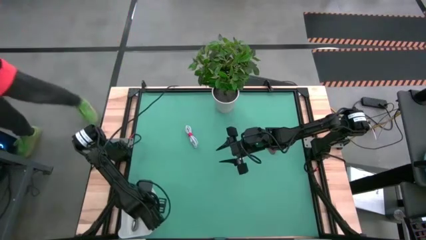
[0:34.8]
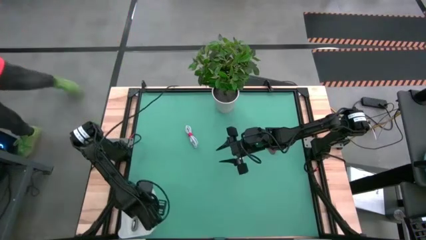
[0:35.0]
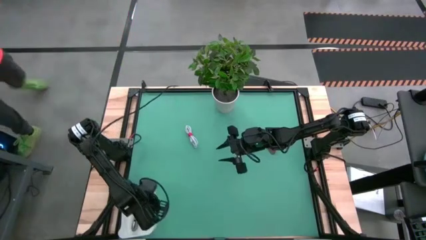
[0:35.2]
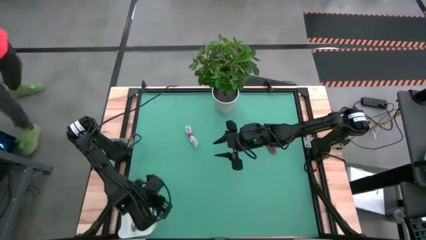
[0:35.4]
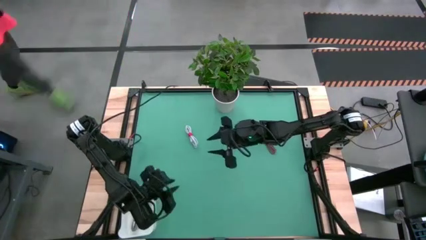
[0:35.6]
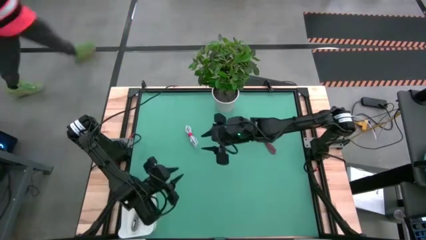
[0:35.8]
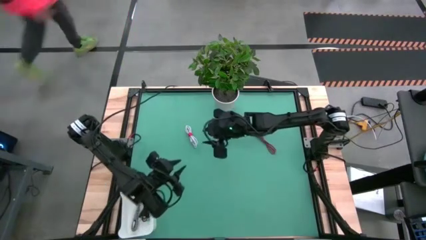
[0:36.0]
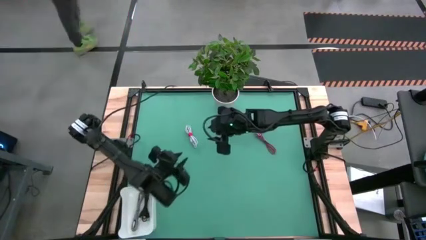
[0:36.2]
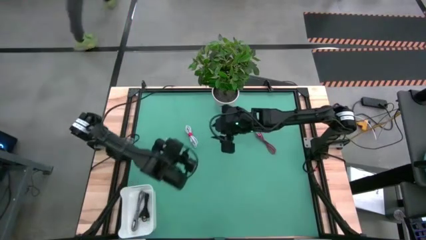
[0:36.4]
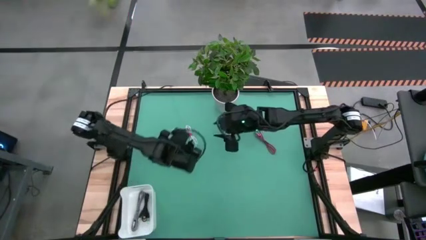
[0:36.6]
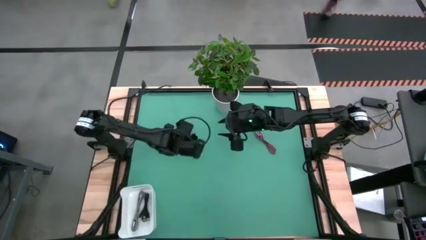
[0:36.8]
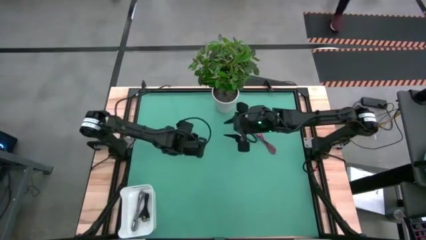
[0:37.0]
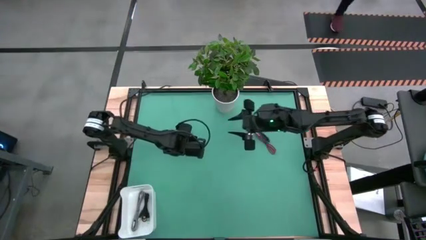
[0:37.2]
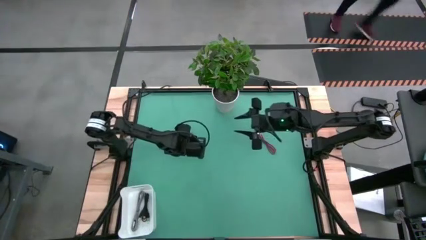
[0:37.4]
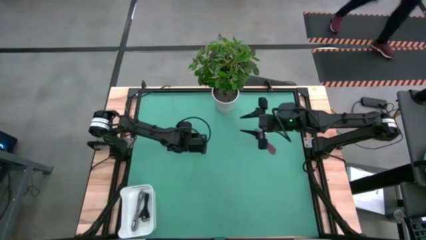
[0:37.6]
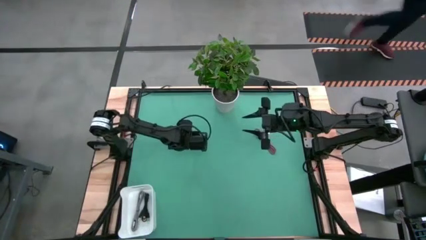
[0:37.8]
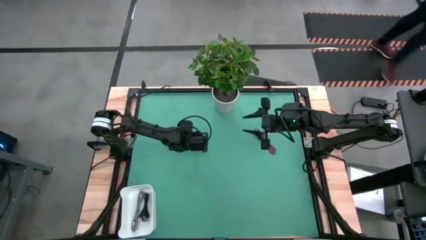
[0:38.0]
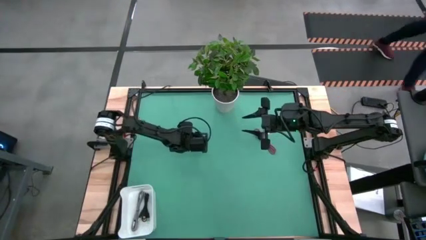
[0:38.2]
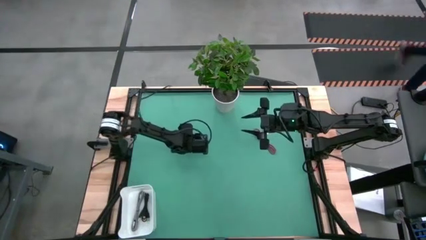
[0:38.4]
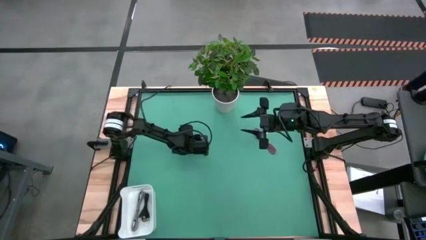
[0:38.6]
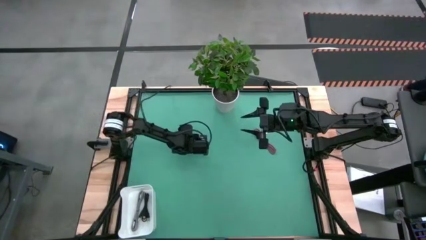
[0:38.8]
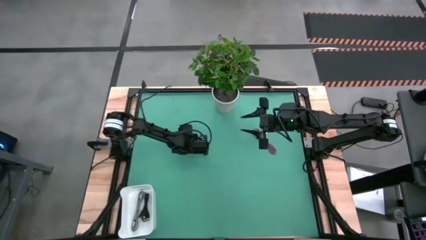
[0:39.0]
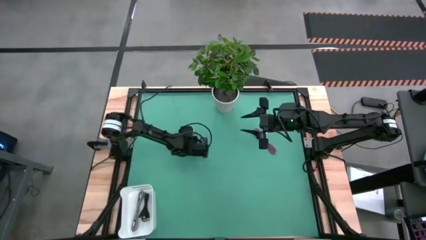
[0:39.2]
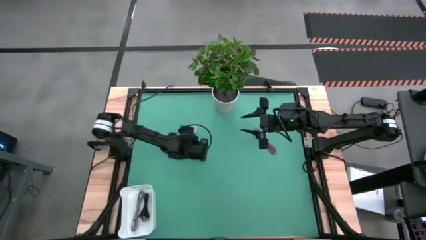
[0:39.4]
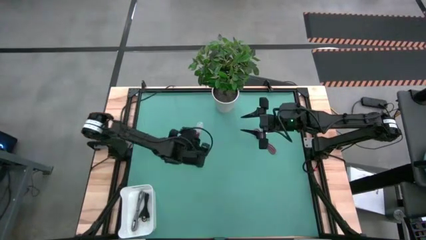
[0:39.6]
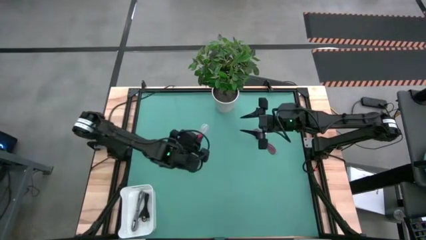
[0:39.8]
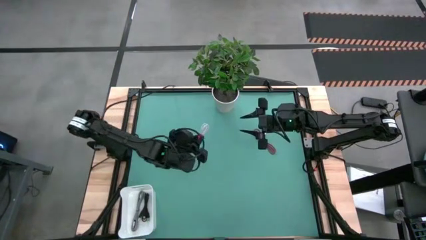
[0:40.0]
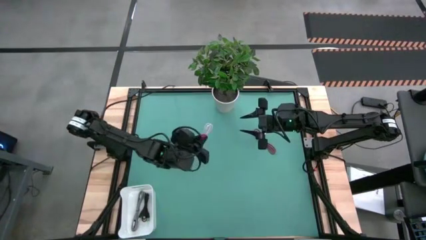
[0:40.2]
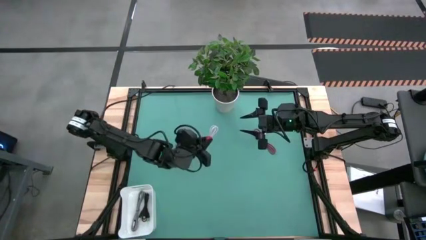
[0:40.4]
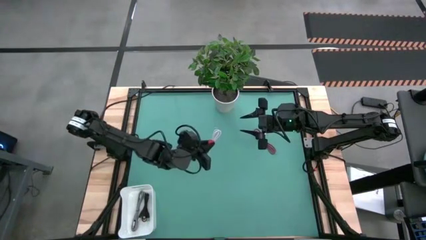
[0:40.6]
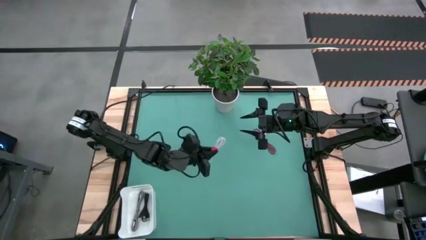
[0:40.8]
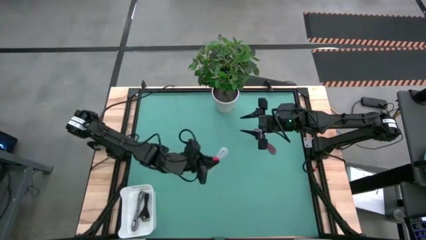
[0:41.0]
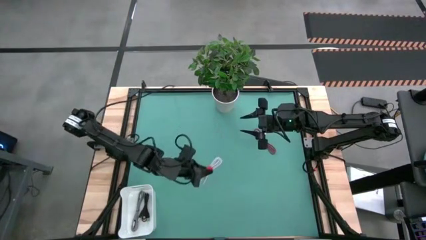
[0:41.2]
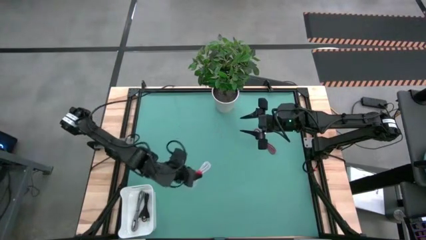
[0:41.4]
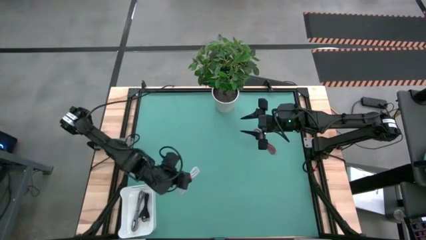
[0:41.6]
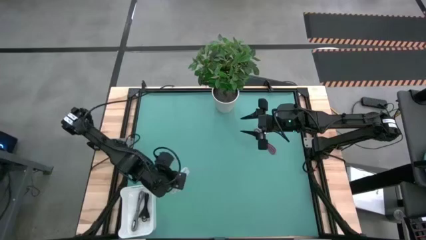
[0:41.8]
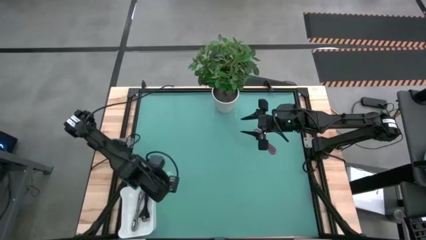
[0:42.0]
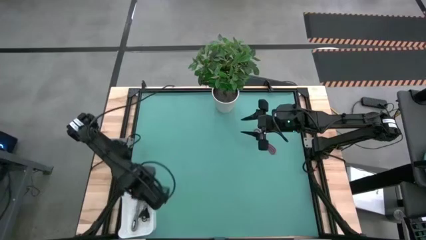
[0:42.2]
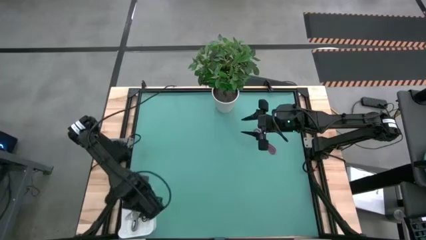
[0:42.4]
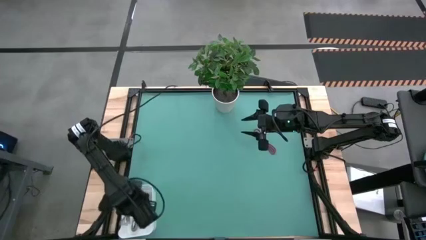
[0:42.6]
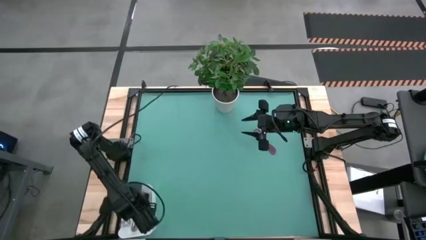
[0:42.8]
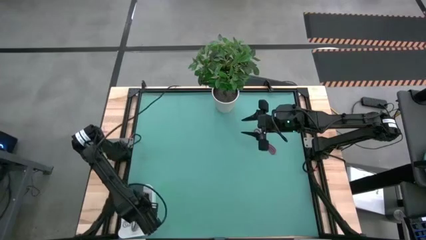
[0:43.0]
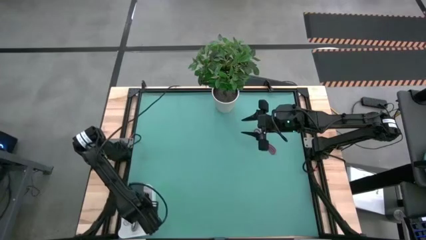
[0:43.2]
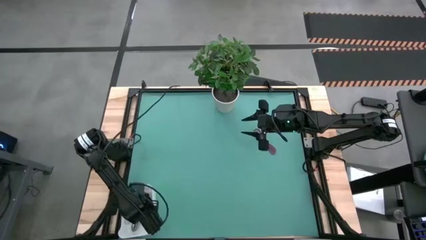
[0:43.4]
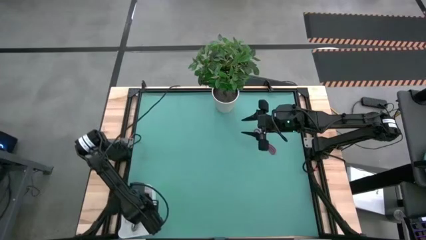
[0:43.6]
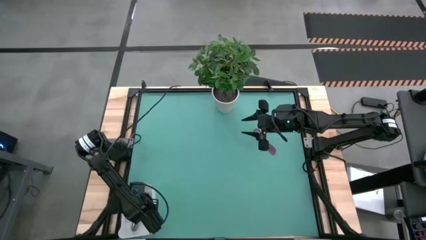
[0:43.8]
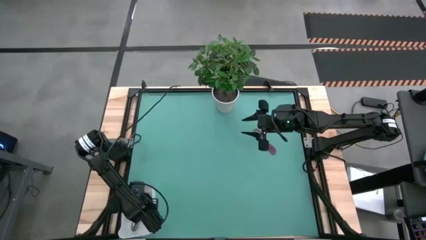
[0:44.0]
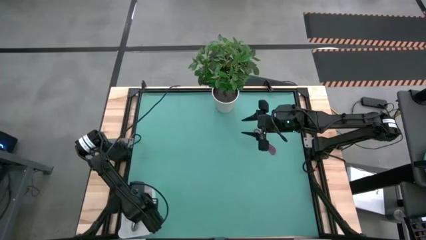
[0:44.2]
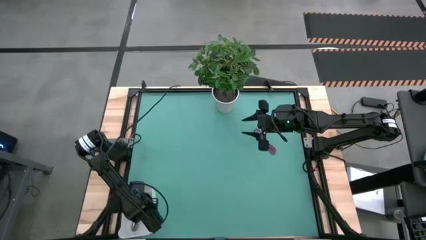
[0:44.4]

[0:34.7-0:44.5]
Task: Pick and place USB-C Cables
Put the white charger cable into the bin
